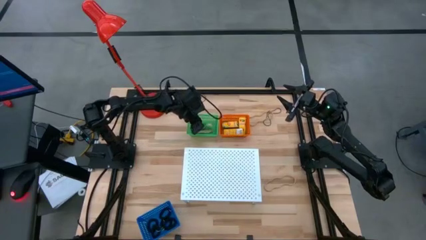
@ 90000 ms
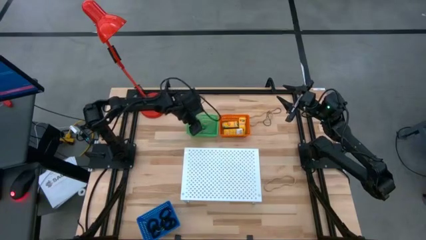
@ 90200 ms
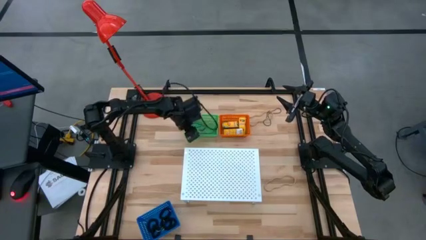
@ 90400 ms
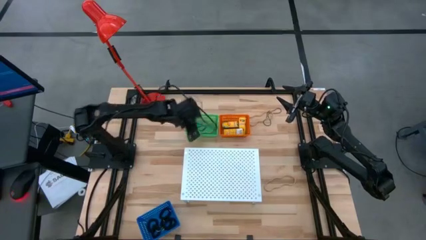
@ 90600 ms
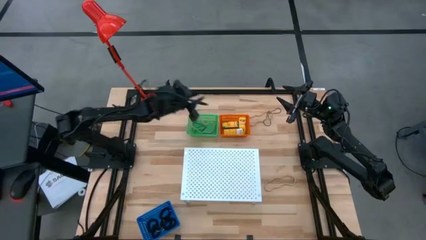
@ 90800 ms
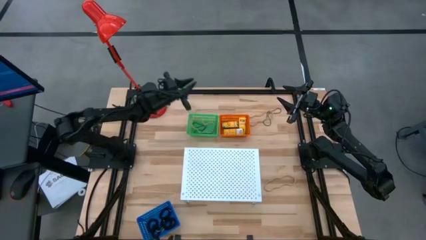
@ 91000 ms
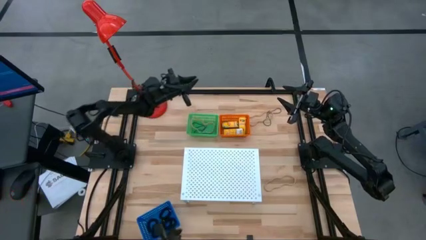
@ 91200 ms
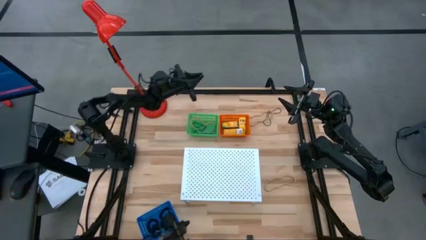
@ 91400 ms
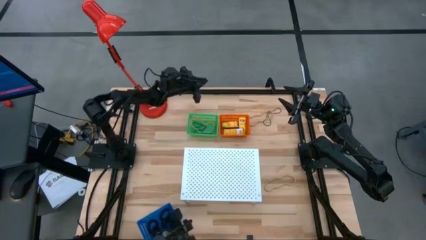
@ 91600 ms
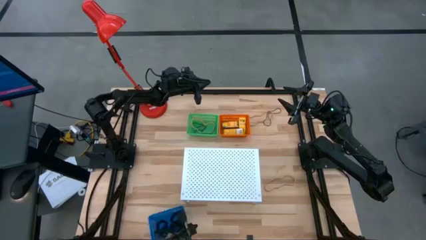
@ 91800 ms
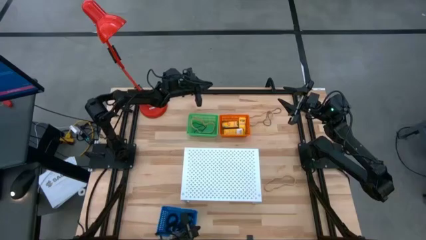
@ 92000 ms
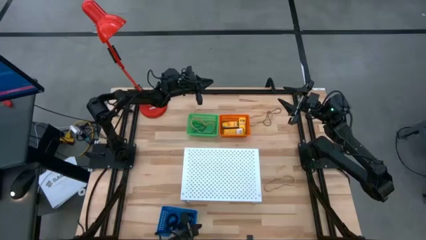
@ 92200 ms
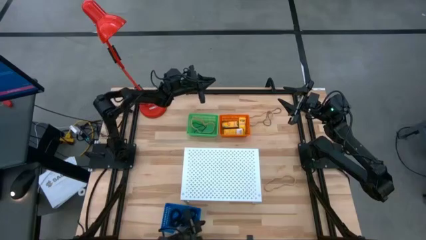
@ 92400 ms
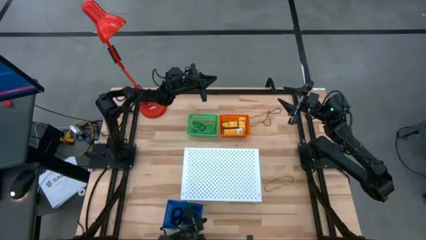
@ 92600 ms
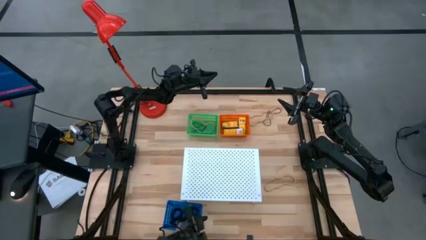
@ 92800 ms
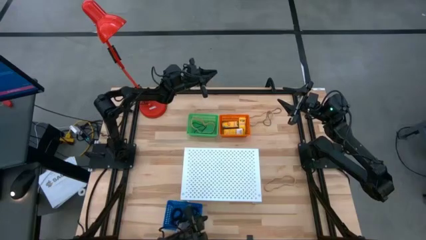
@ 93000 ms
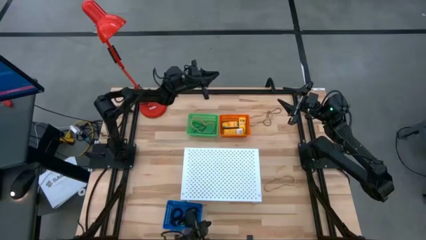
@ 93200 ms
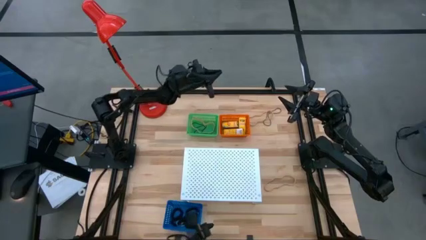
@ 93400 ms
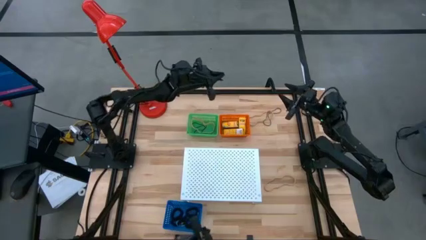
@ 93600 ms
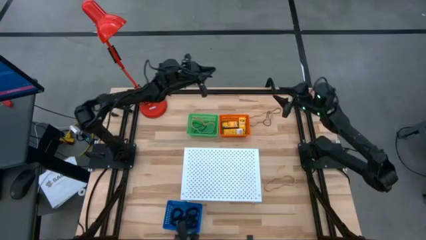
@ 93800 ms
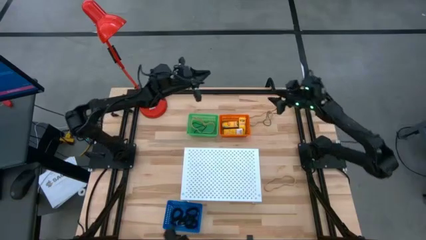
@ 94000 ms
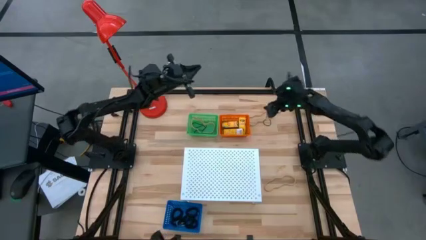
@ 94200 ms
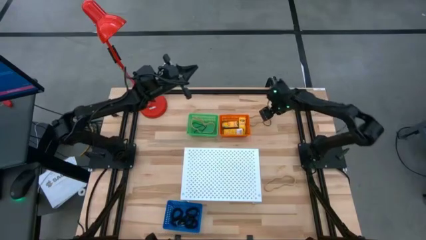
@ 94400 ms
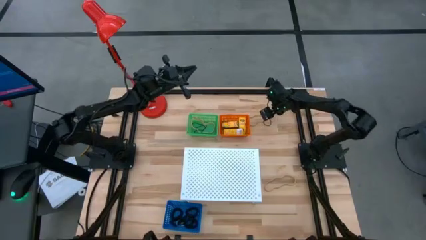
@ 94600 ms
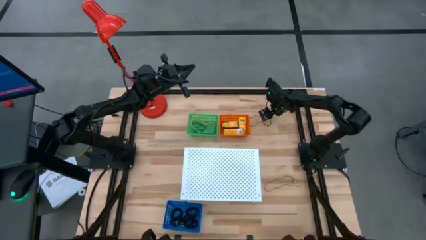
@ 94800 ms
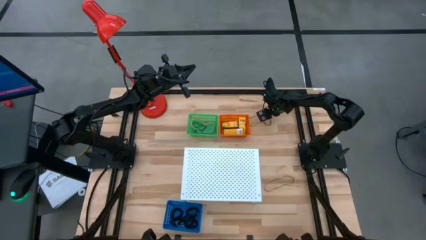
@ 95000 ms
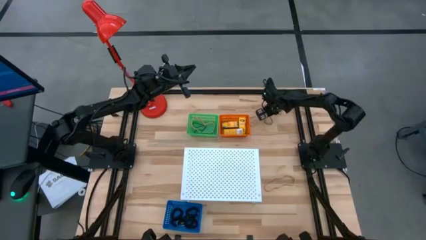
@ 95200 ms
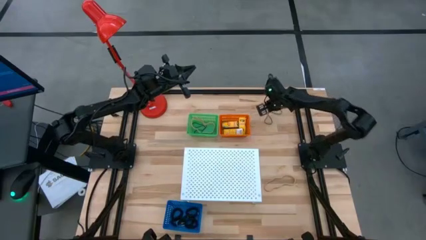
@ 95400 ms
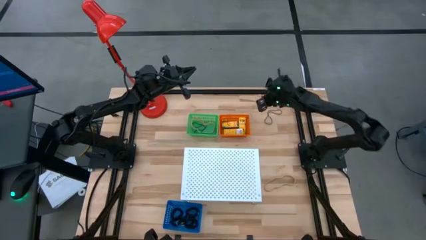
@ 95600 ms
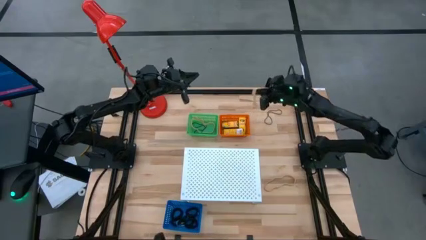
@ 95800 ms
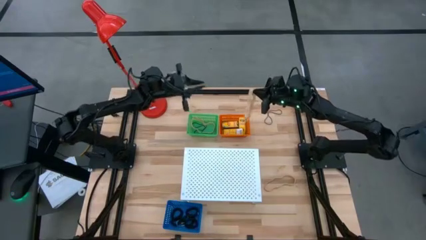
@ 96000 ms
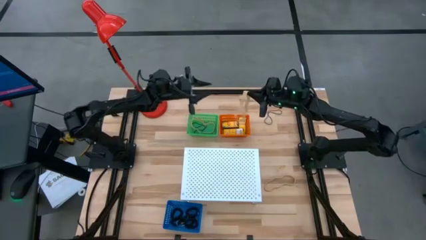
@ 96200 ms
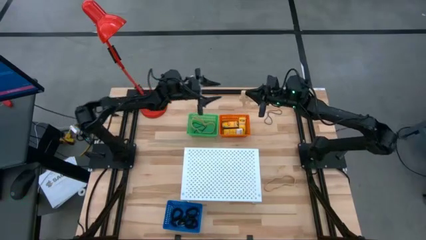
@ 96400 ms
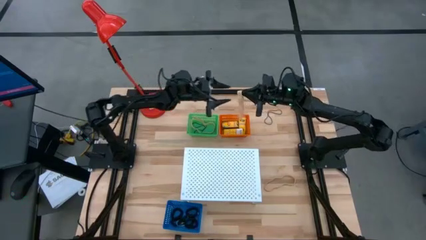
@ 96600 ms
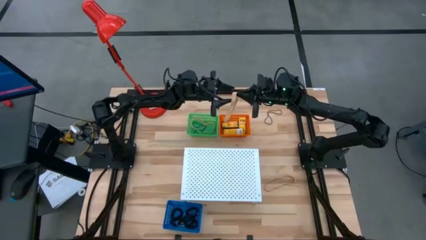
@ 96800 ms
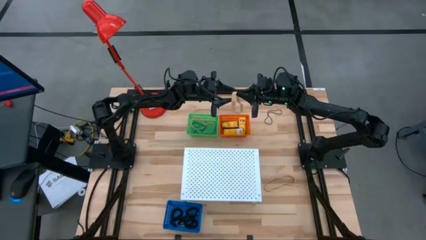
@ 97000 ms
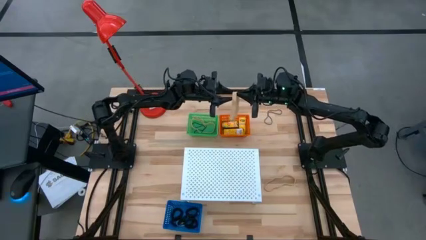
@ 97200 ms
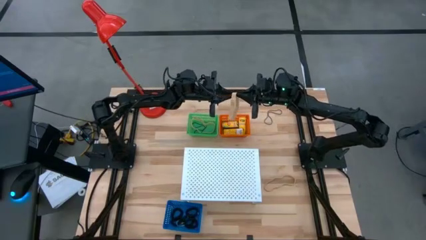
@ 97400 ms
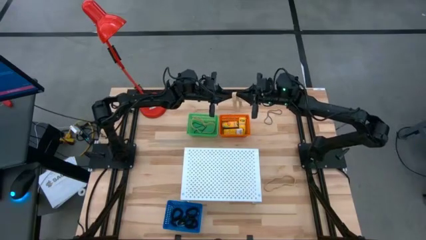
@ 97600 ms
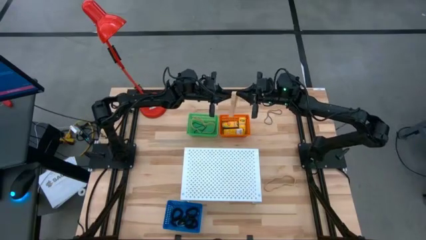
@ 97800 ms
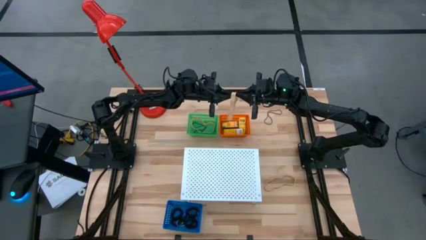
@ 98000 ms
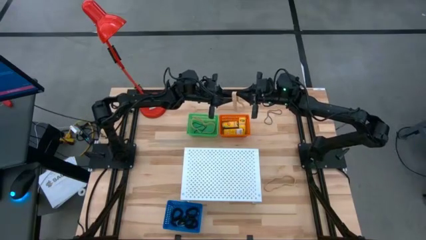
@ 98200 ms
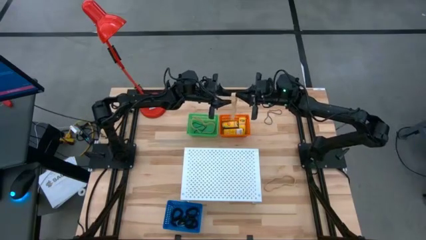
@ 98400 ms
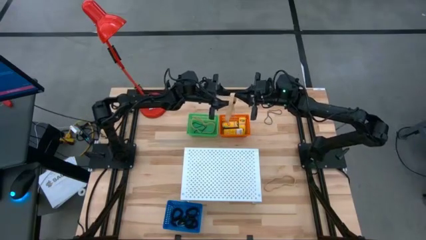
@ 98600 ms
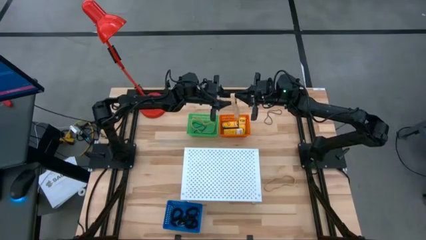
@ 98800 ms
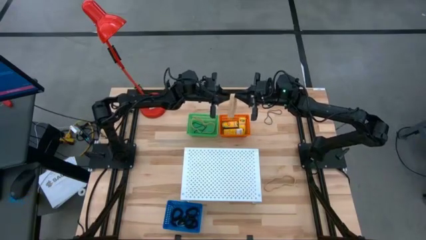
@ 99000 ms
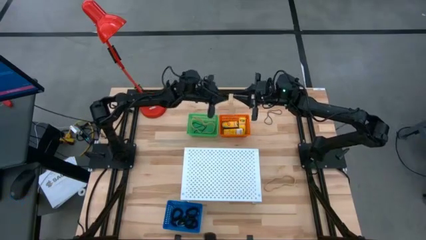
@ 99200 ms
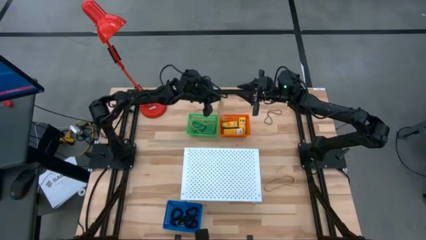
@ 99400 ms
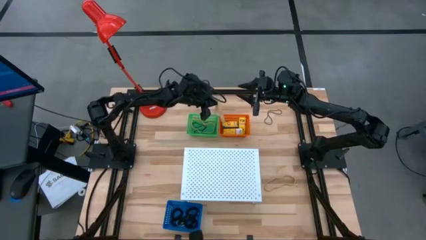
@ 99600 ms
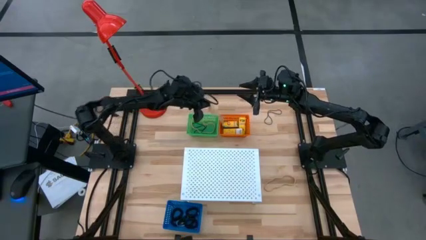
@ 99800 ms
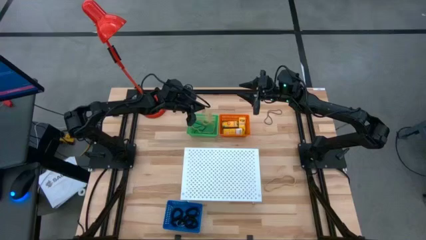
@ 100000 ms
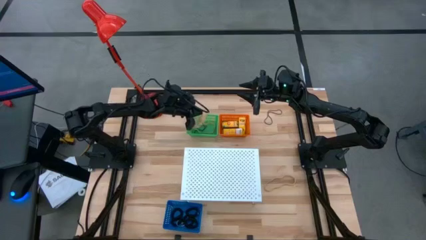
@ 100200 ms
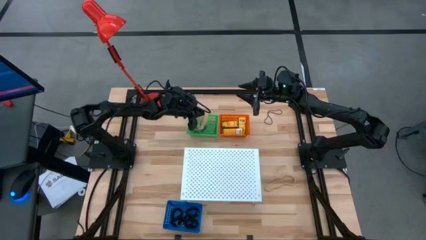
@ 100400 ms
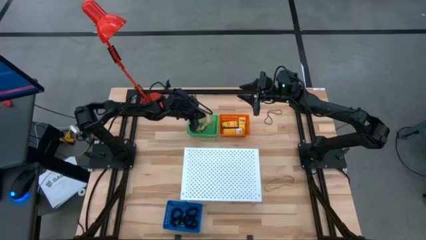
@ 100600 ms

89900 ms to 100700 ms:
Task: Pick & Place Office Desk Supplies
Put the brown rubber band into the green bin

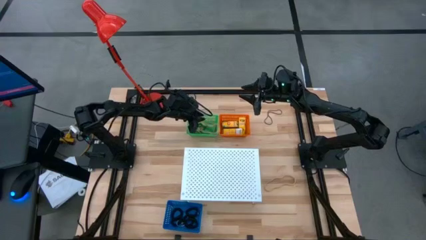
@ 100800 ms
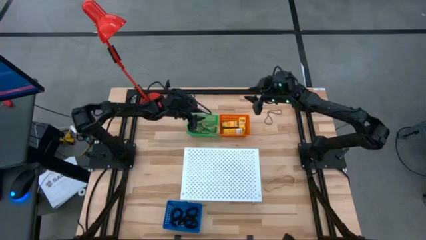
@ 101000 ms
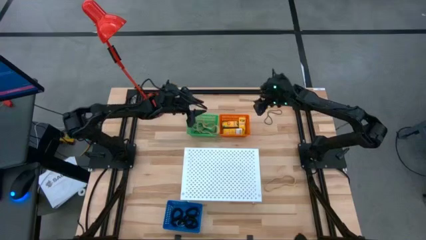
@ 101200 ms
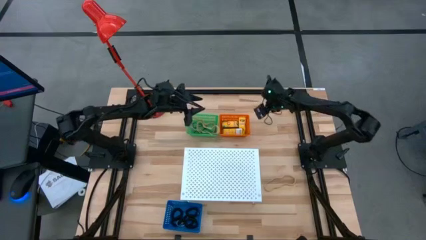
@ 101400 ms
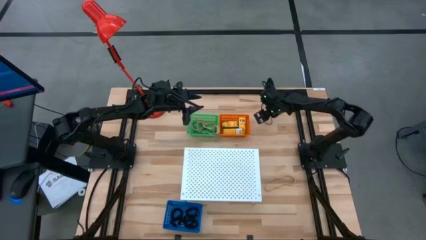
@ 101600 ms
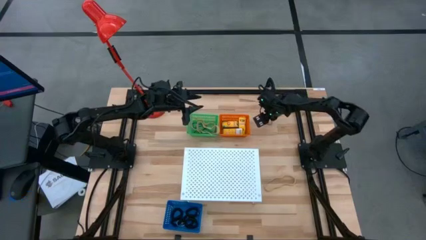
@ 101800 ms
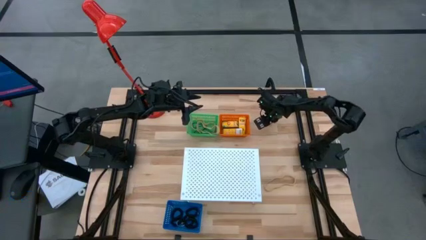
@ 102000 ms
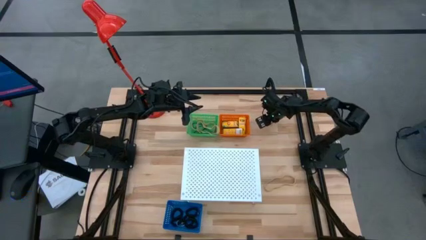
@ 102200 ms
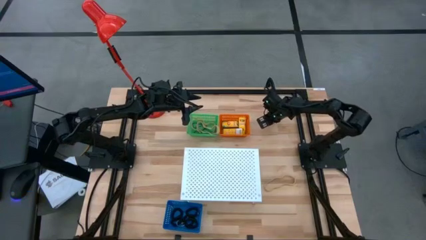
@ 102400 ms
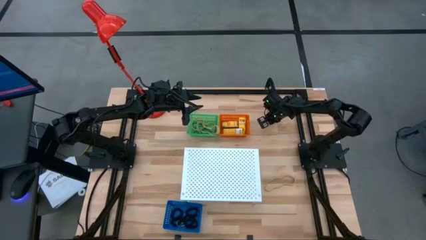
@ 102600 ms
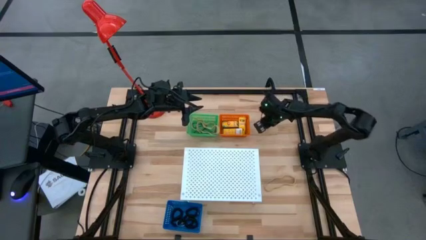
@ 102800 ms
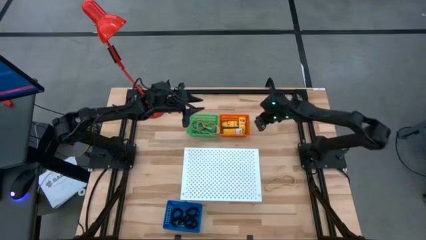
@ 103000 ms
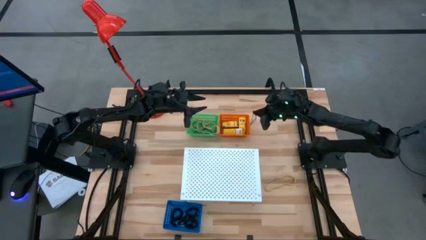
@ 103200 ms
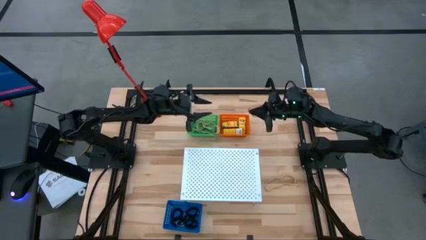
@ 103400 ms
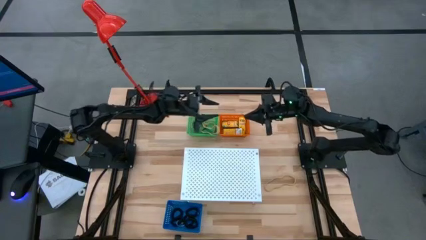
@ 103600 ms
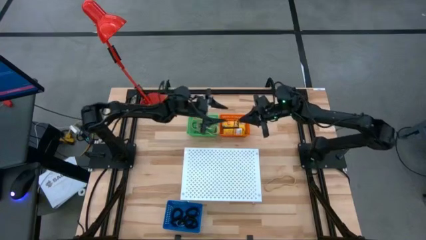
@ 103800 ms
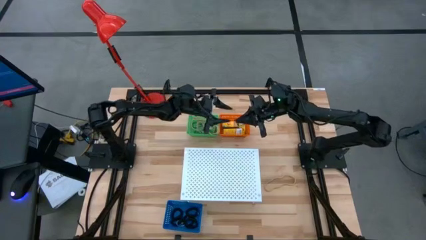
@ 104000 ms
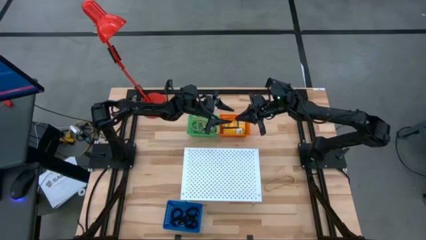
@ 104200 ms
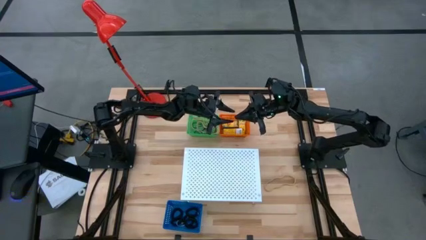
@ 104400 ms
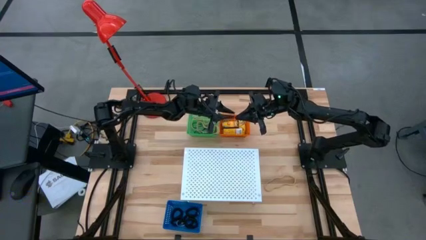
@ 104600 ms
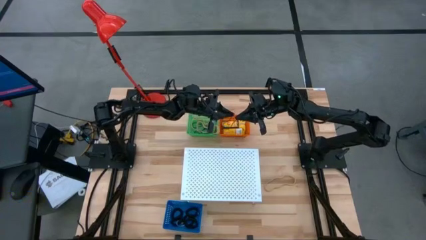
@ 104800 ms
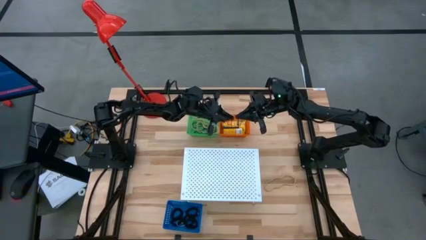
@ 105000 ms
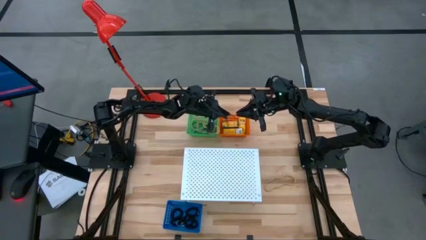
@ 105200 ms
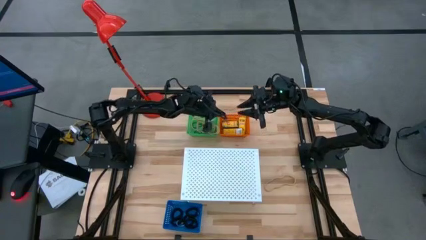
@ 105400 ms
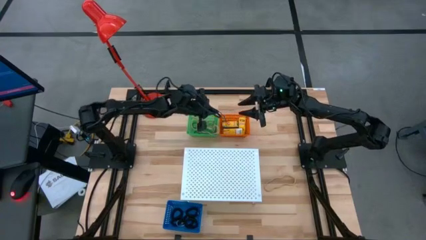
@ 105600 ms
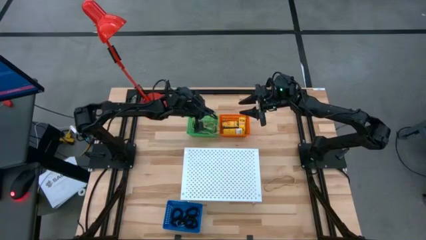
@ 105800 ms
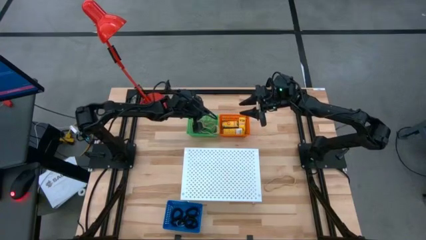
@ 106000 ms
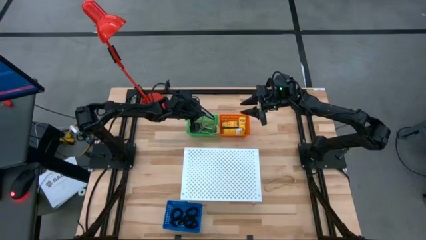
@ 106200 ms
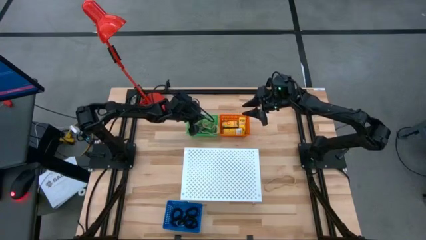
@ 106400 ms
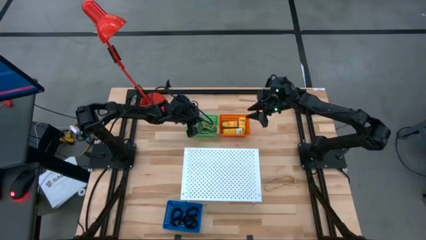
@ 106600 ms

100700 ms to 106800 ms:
Put the violet rubber band into the green bin
